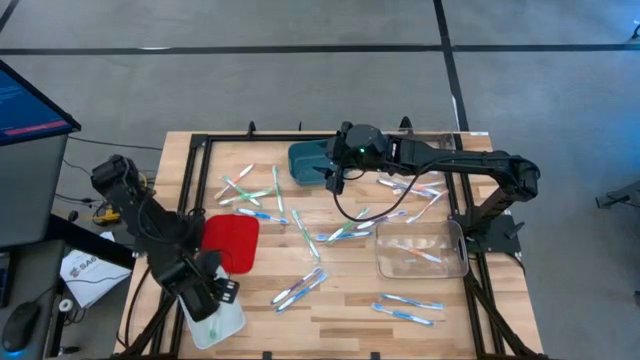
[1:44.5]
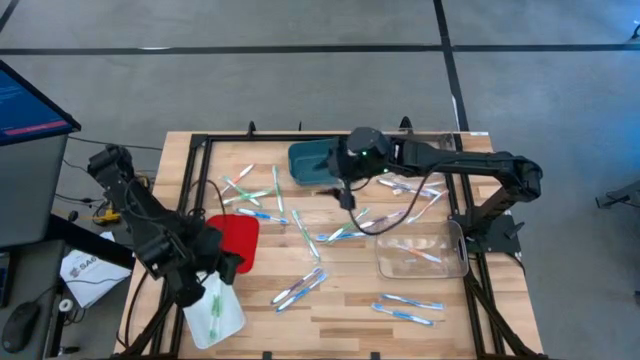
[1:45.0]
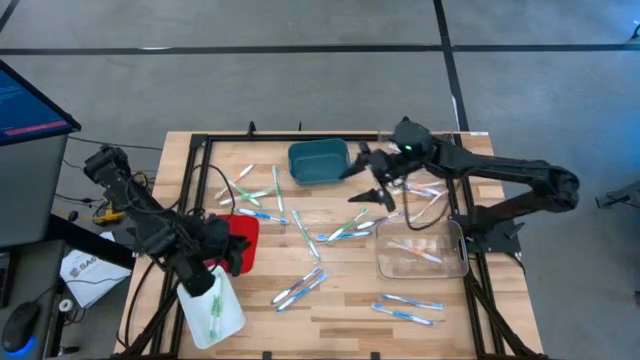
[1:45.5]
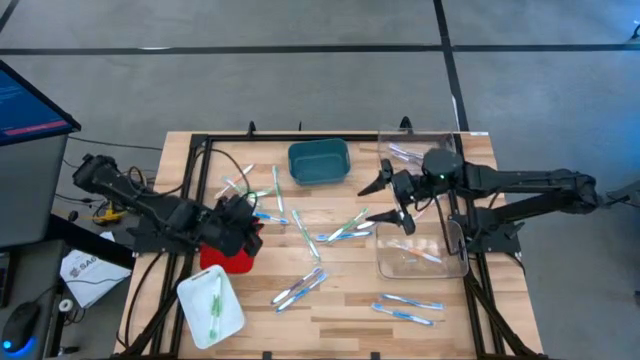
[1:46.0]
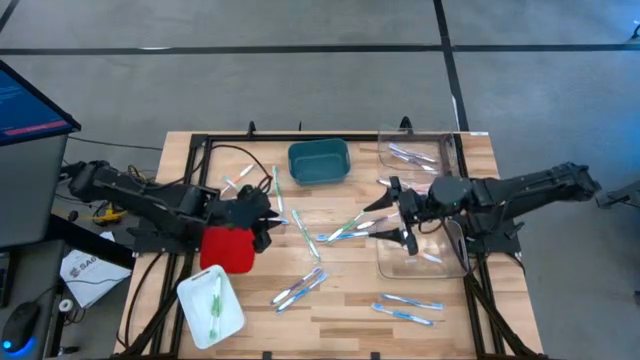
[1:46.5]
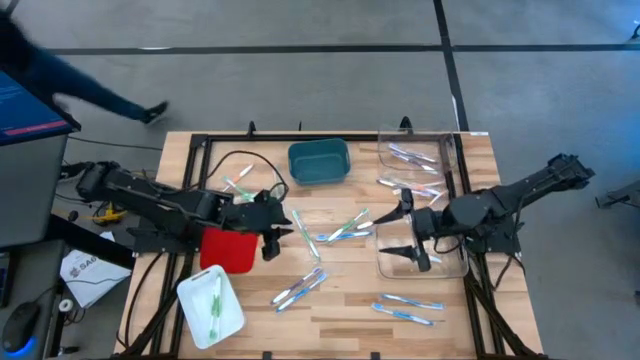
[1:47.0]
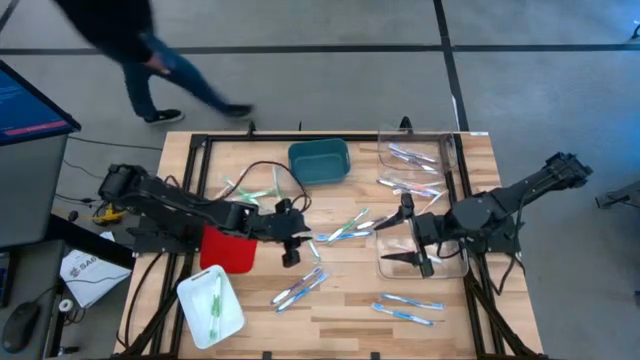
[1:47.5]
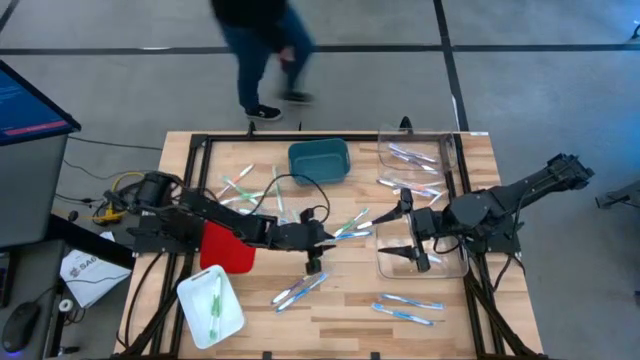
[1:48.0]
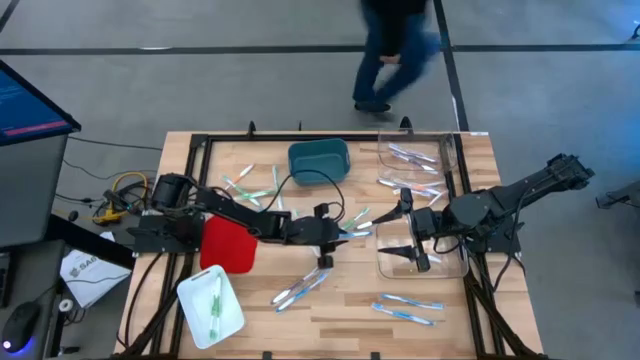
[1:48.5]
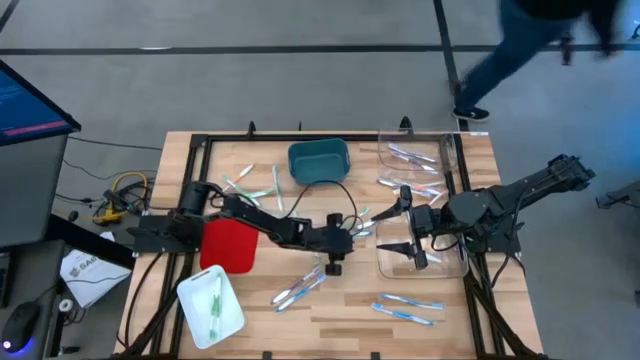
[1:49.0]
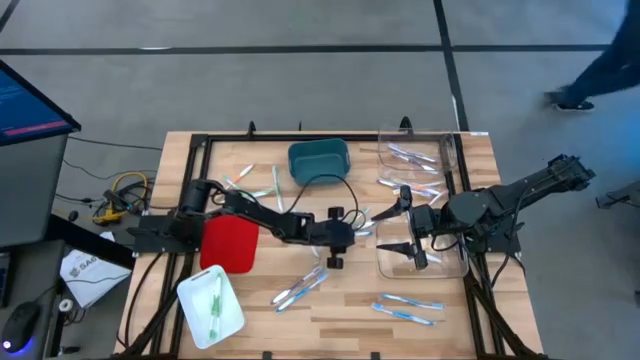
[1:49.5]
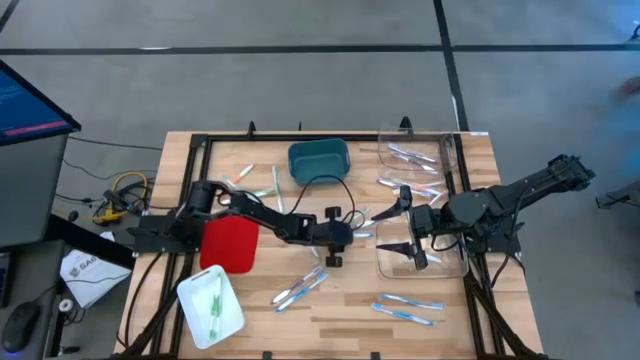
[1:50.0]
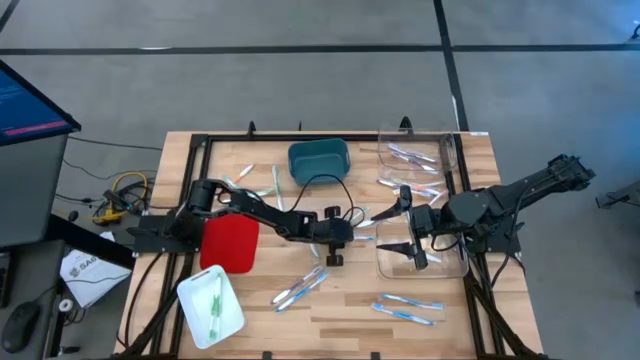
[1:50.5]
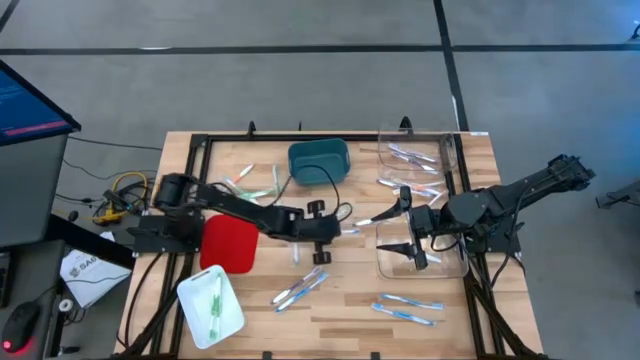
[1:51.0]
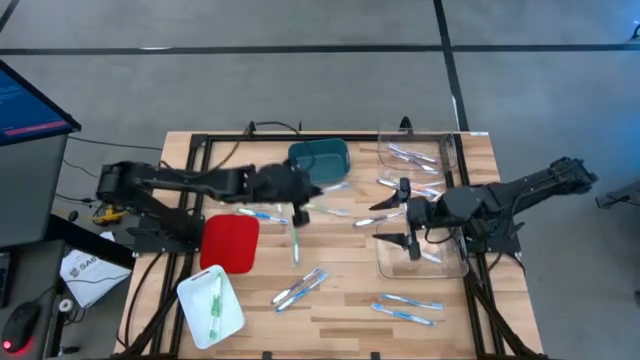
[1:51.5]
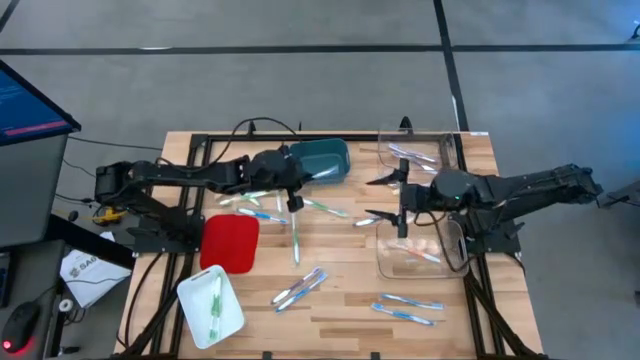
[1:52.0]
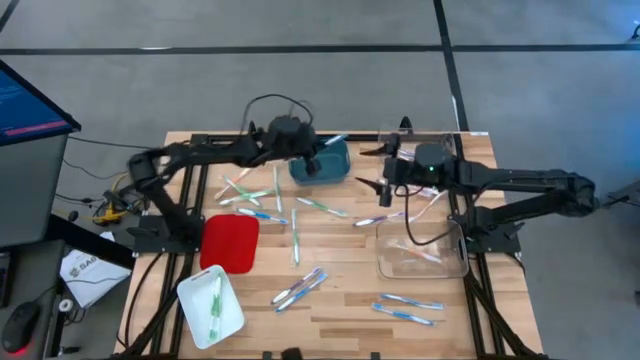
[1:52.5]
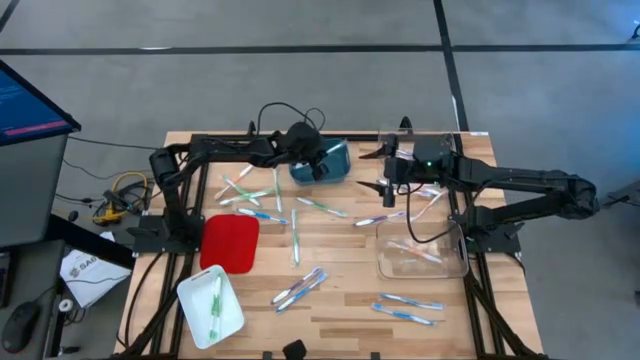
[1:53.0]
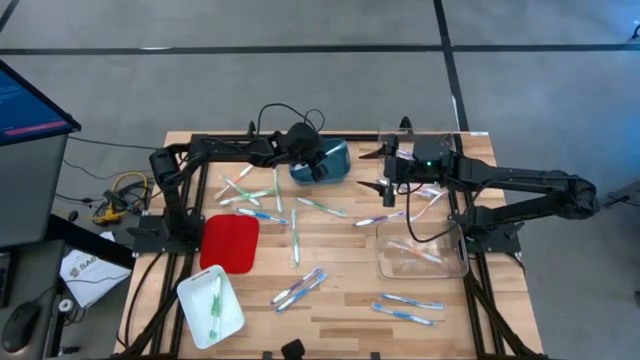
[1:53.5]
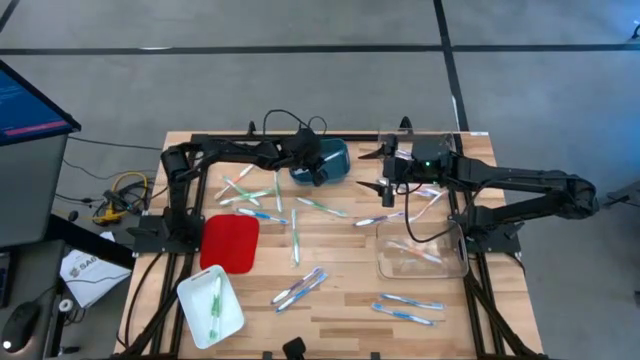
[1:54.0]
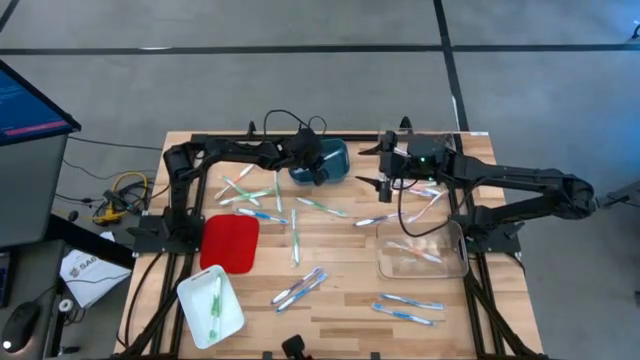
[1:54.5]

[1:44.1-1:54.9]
Task: Pick & Place Toothbrushes
Put the blue toothbrush into the blue bin

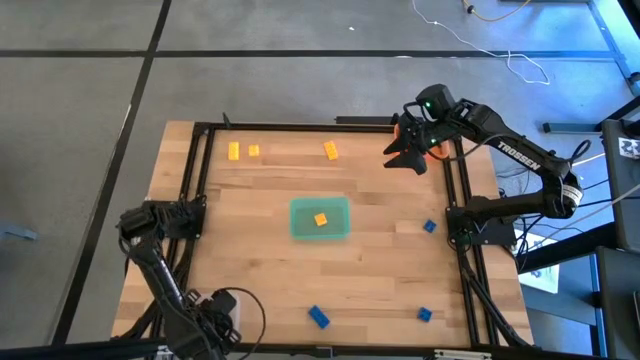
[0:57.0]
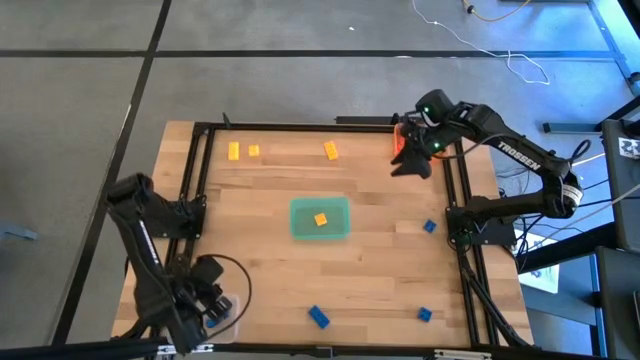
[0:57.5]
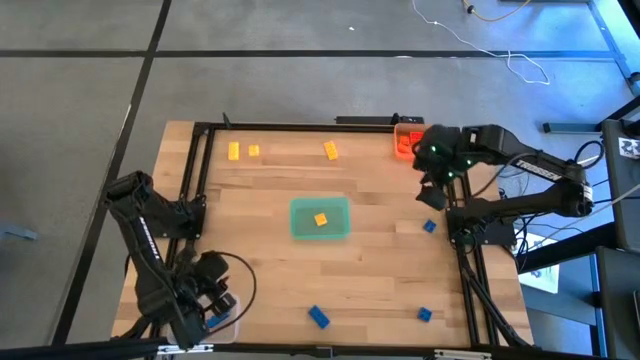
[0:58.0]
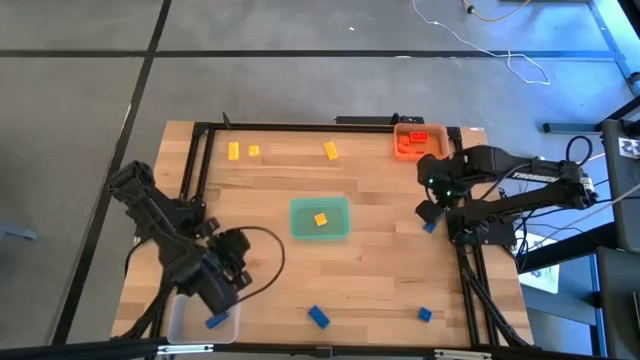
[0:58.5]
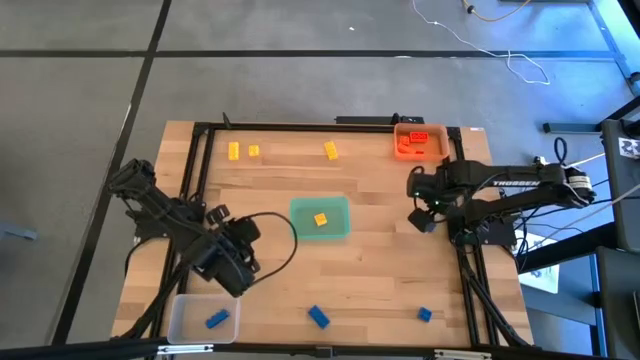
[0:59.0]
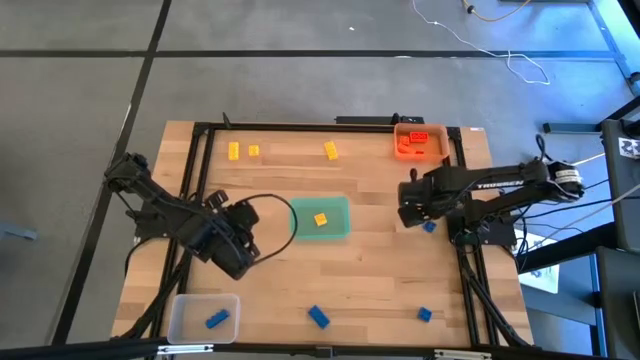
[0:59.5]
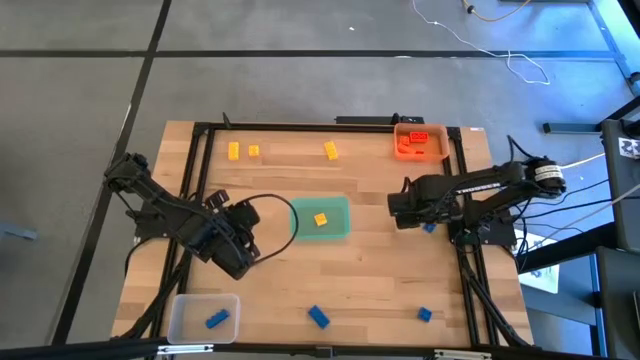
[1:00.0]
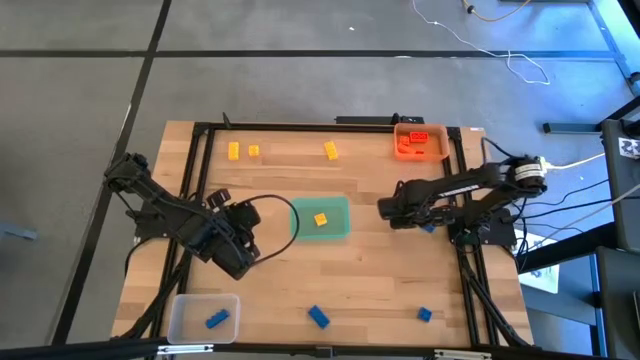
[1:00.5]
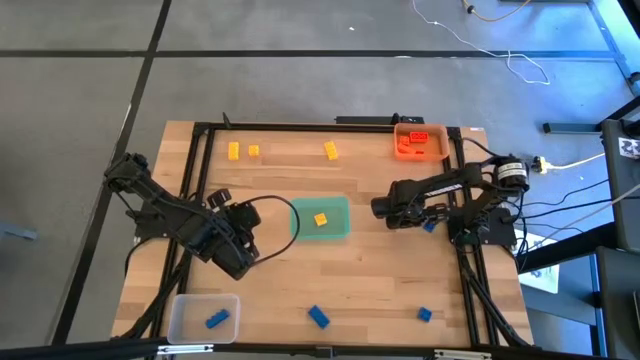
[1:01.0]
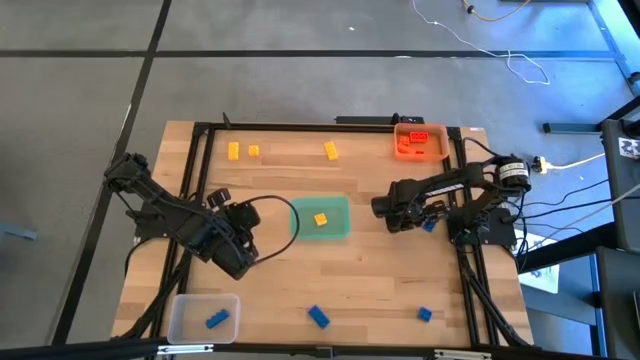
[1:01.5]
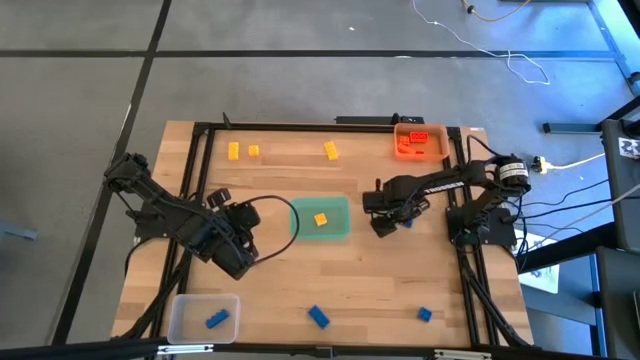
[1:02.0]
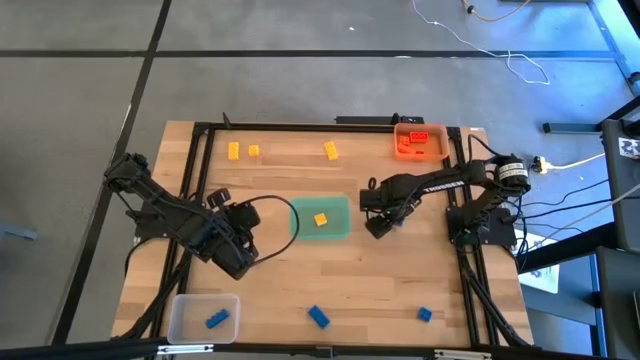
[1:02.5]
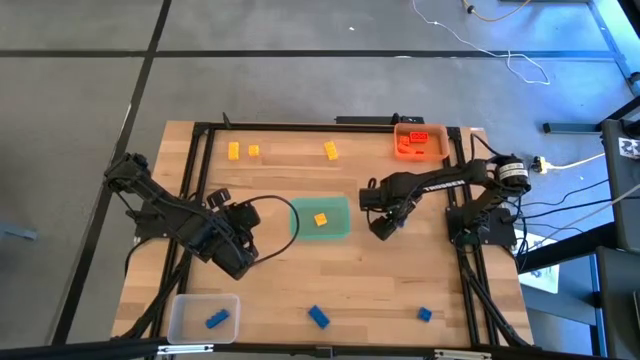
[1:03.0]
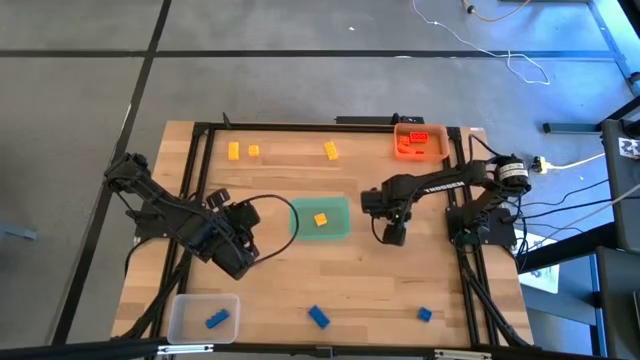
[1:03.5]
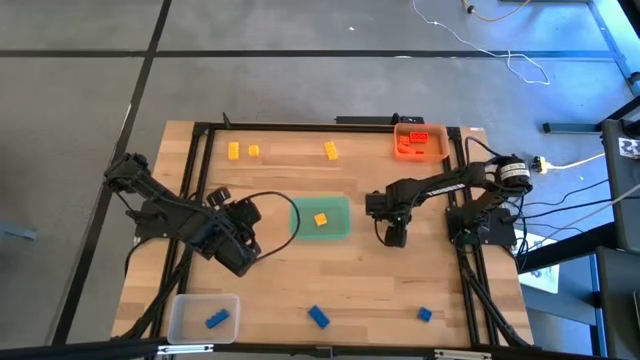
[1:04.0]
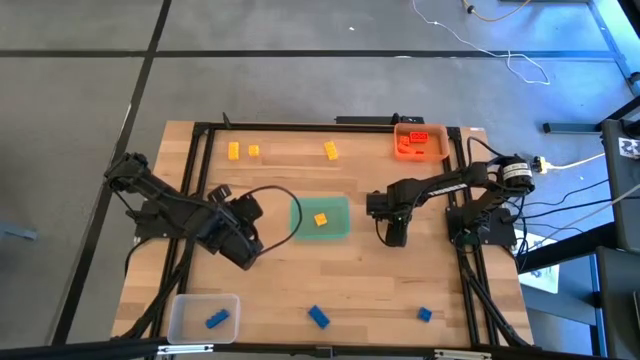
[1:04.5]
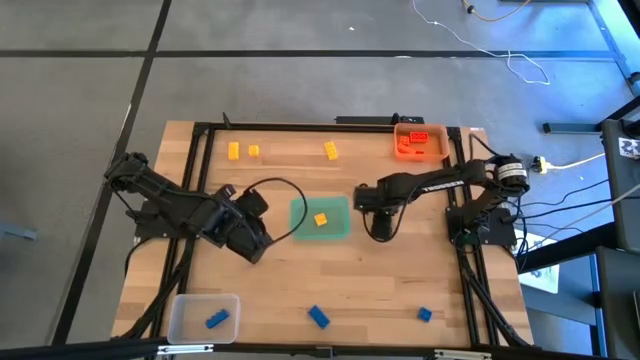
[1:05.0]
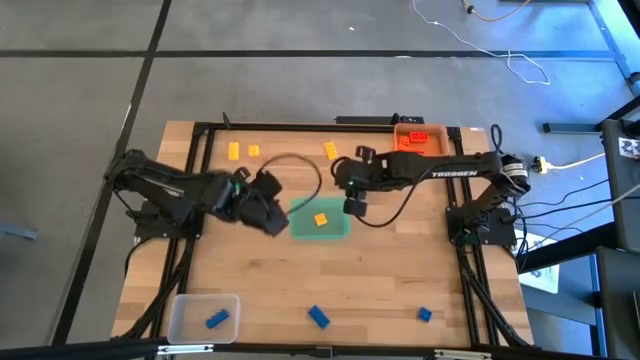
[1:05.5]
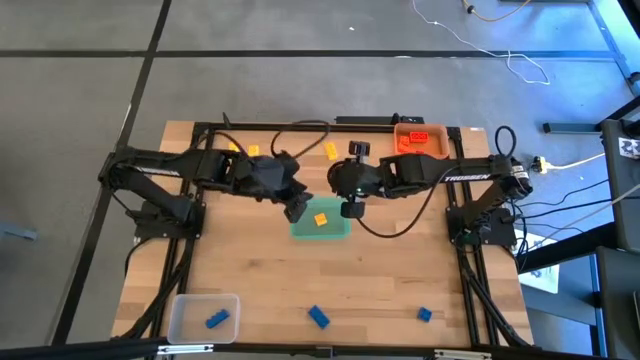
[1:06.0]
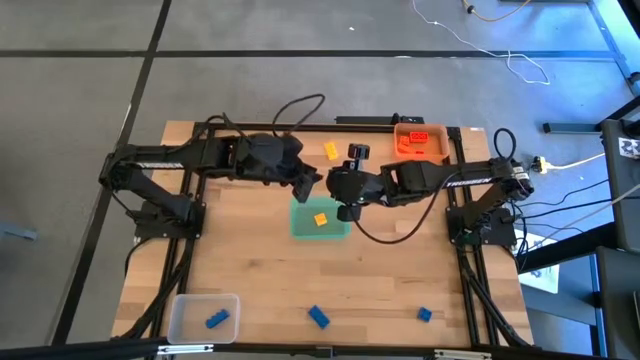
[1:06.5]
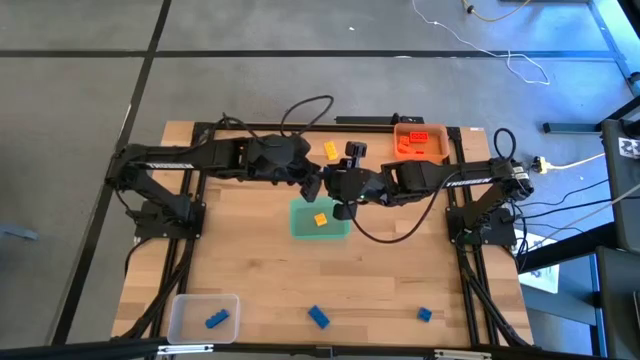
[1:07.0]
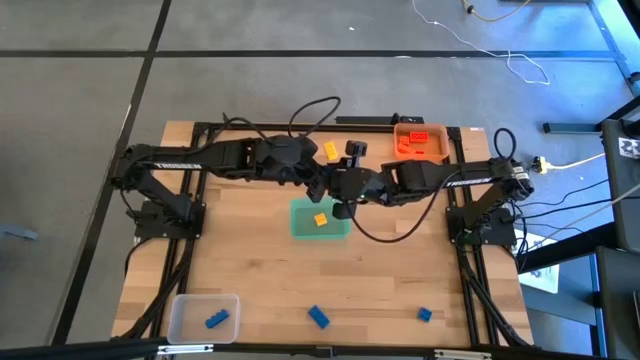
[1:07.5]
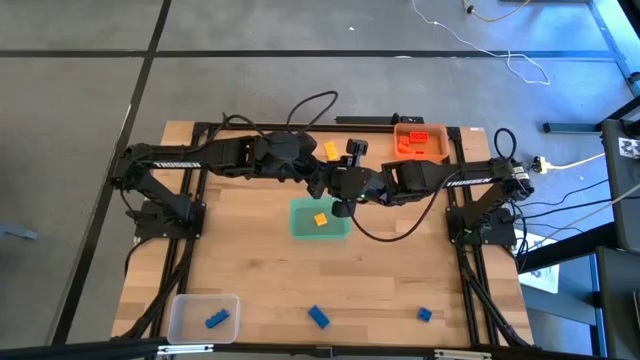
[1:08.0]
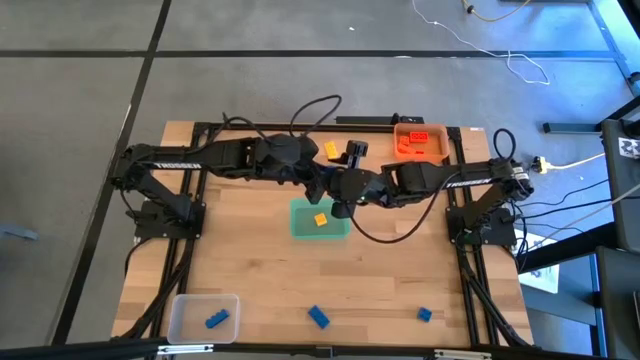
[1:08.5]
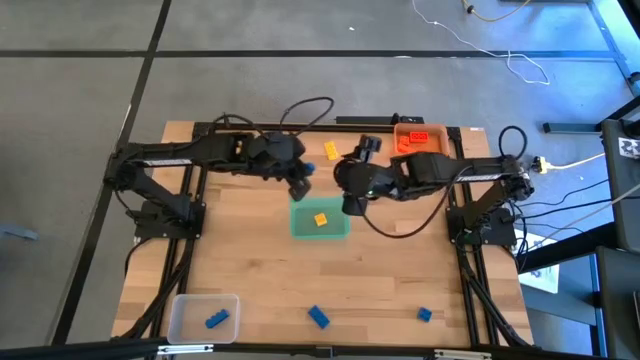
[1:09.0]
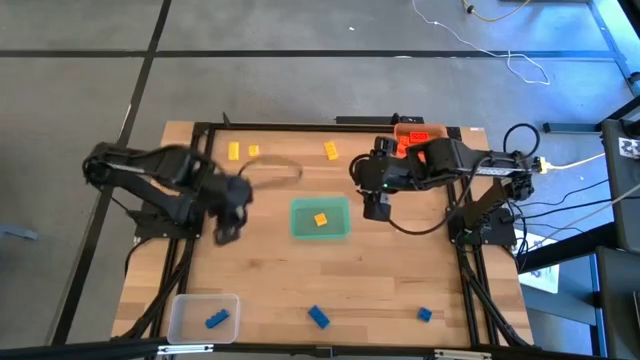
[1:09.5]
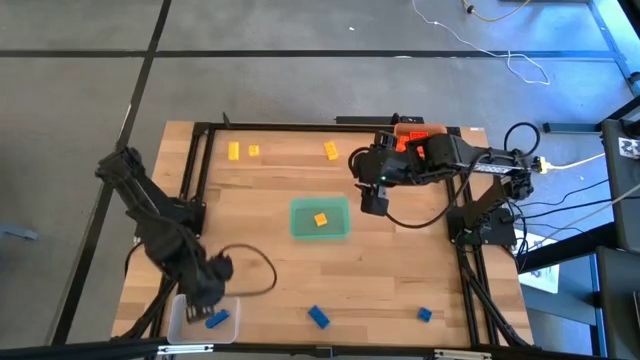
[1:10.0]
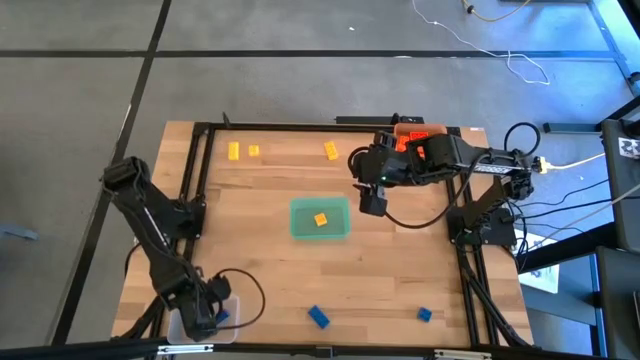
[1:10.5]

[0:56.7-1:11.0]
Task: Sort & place blocks by color
Put the blue game piece into the transparent bin
